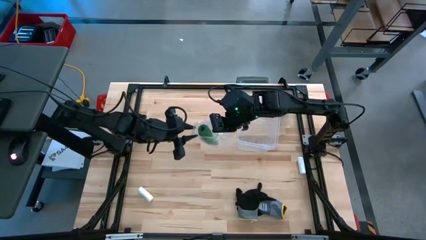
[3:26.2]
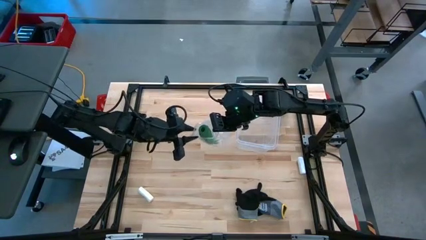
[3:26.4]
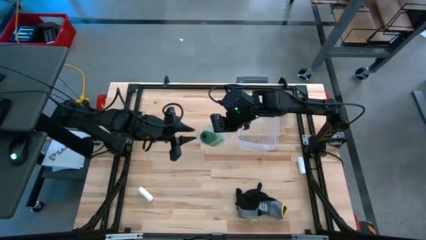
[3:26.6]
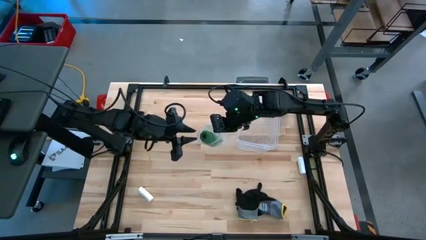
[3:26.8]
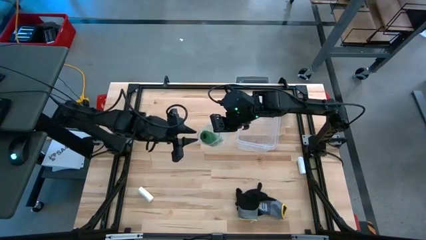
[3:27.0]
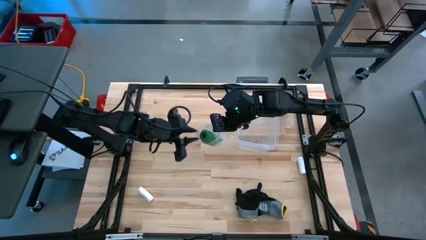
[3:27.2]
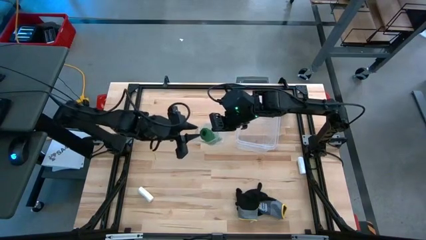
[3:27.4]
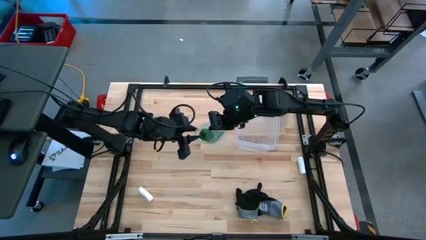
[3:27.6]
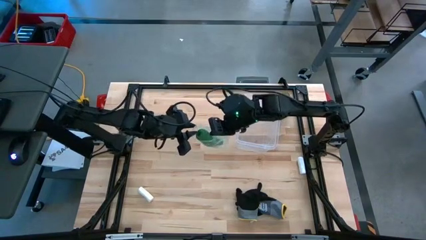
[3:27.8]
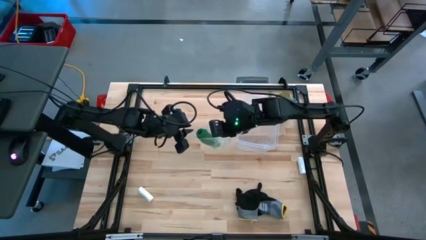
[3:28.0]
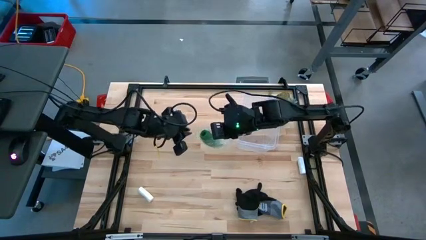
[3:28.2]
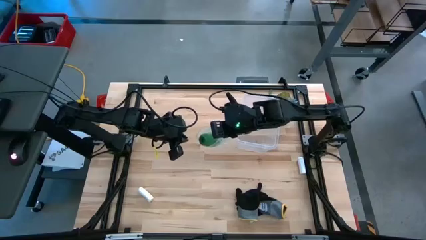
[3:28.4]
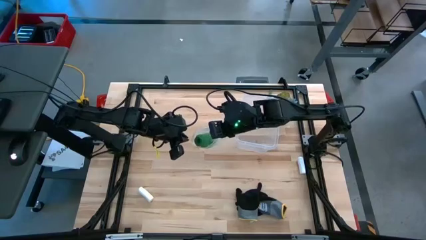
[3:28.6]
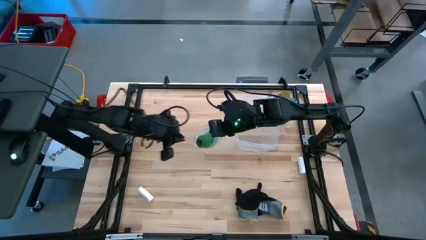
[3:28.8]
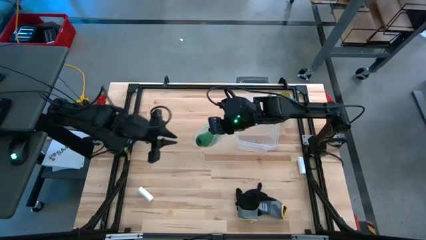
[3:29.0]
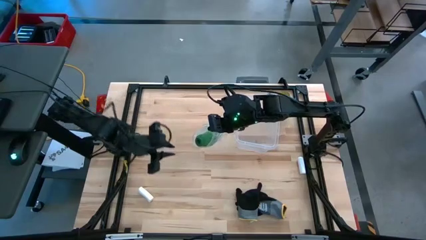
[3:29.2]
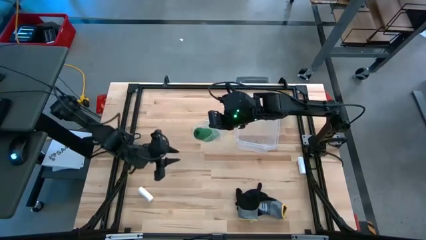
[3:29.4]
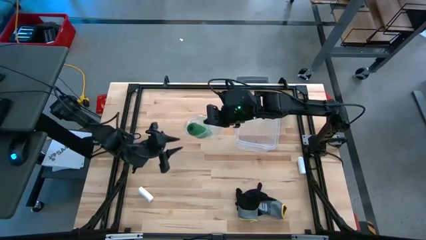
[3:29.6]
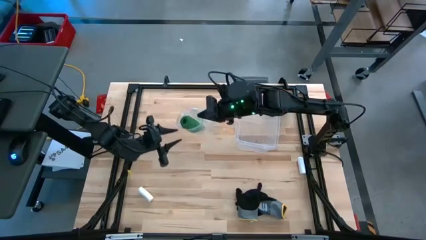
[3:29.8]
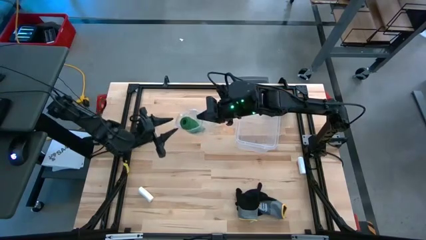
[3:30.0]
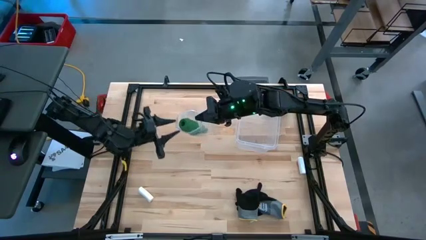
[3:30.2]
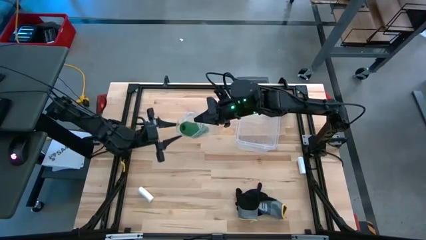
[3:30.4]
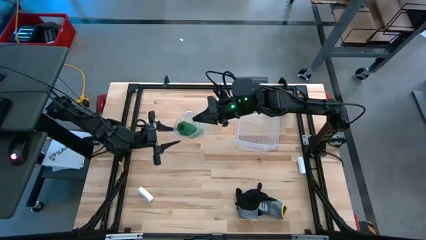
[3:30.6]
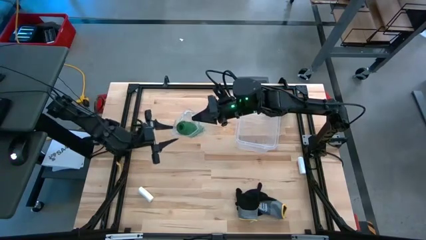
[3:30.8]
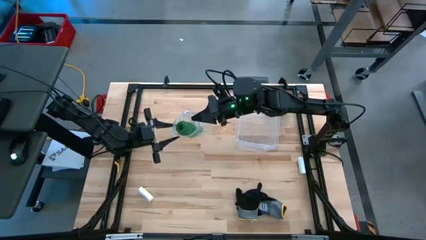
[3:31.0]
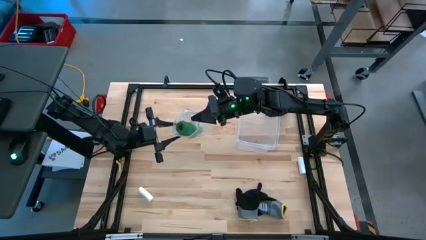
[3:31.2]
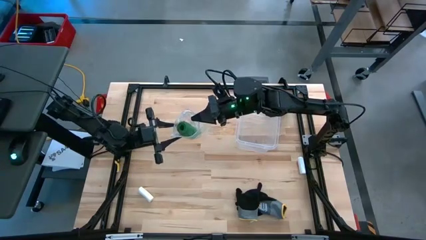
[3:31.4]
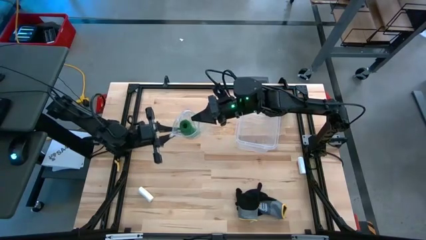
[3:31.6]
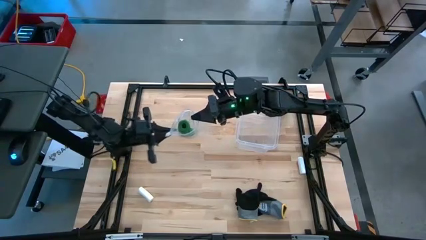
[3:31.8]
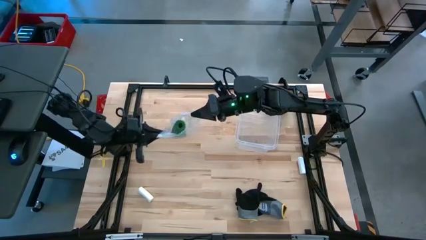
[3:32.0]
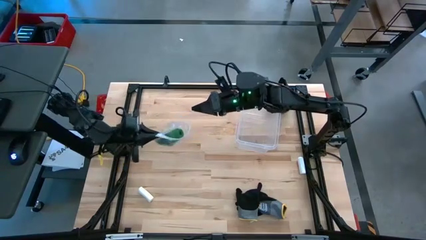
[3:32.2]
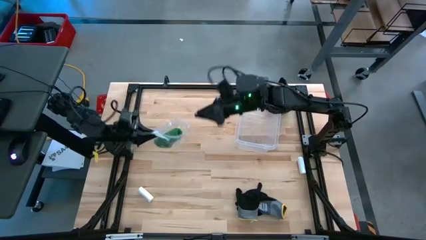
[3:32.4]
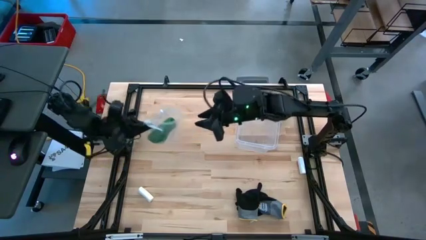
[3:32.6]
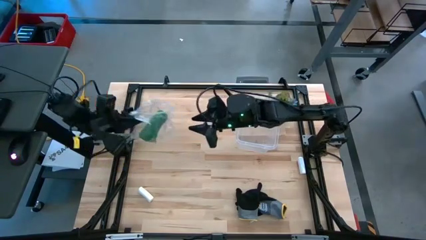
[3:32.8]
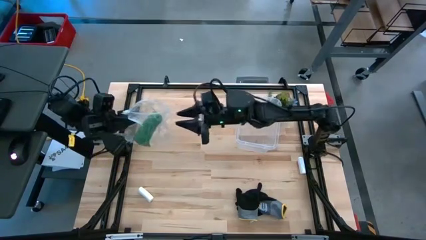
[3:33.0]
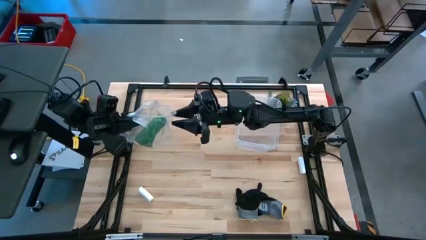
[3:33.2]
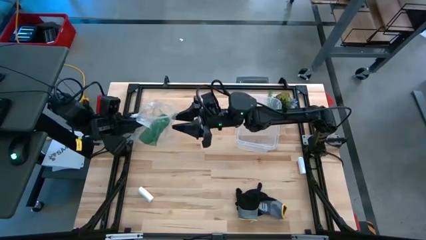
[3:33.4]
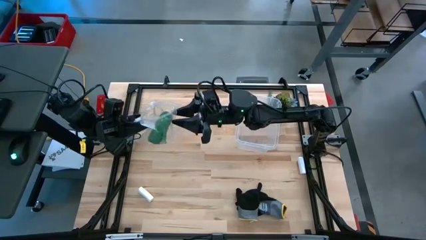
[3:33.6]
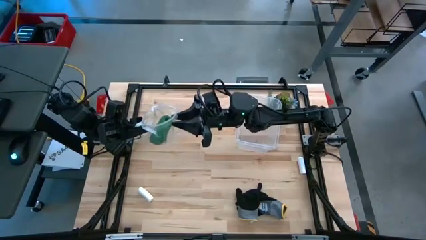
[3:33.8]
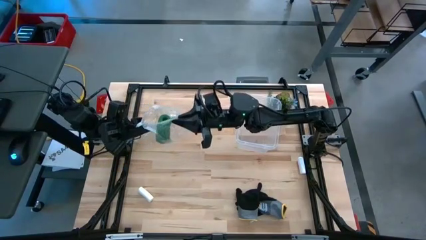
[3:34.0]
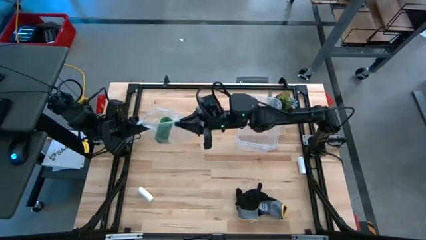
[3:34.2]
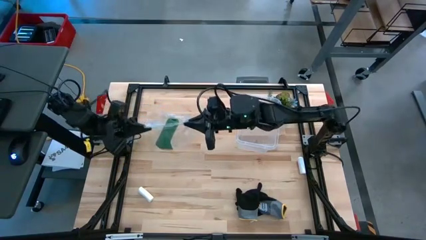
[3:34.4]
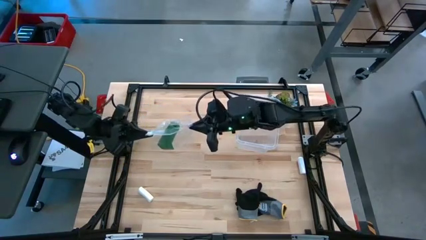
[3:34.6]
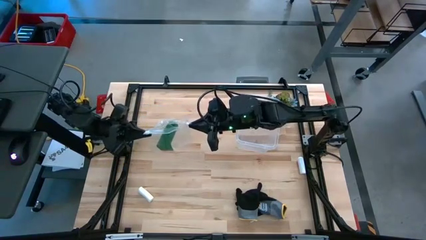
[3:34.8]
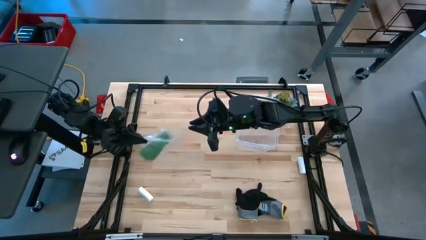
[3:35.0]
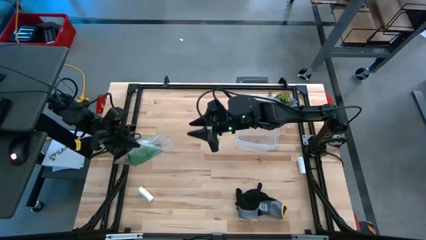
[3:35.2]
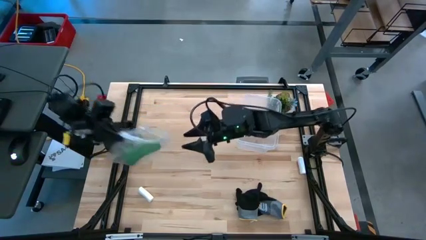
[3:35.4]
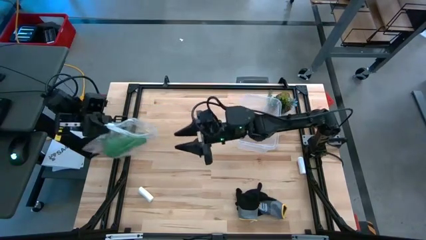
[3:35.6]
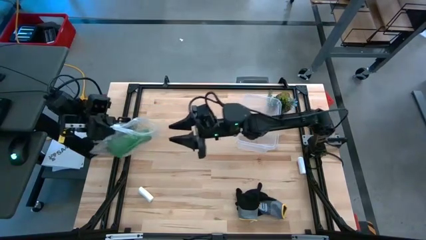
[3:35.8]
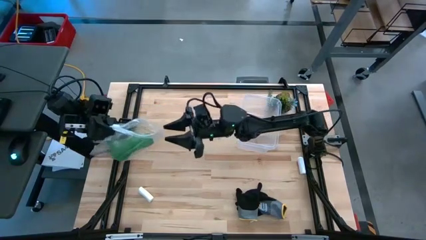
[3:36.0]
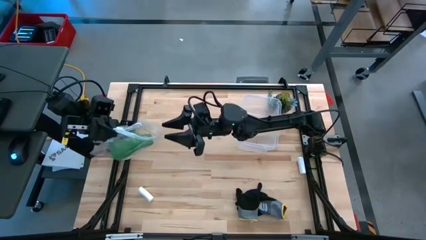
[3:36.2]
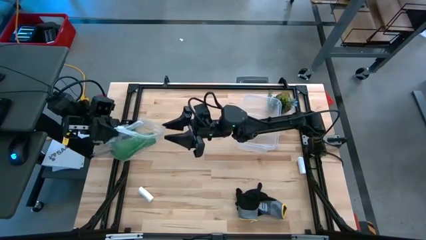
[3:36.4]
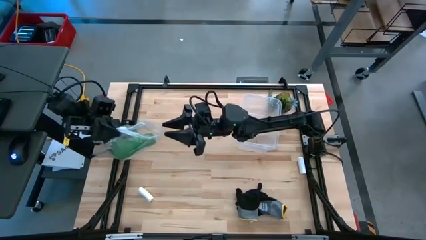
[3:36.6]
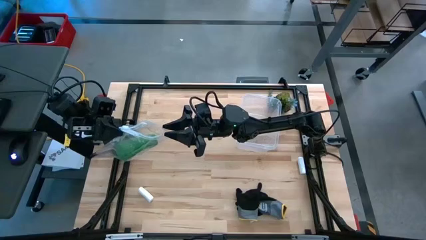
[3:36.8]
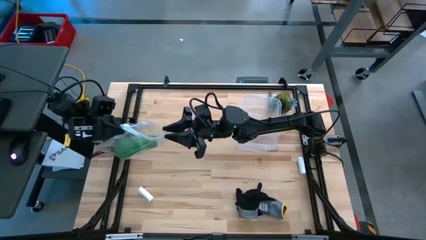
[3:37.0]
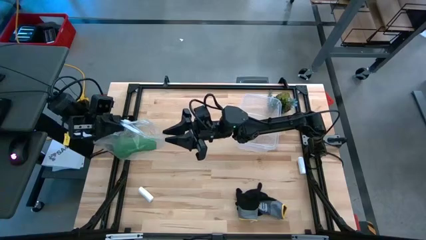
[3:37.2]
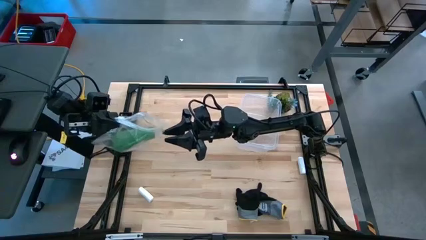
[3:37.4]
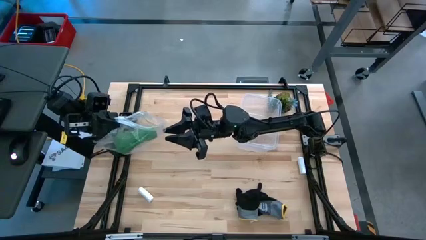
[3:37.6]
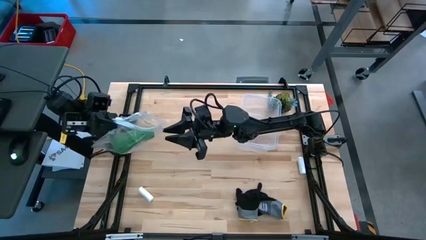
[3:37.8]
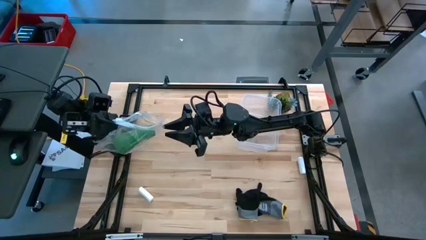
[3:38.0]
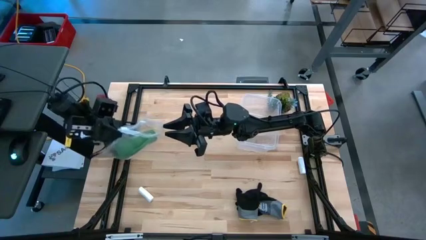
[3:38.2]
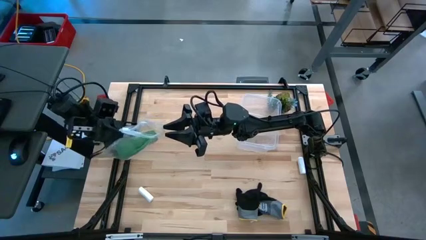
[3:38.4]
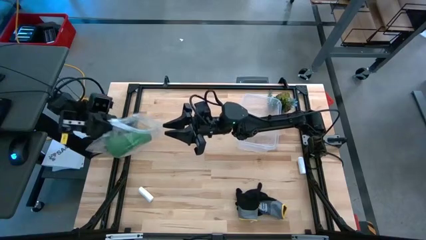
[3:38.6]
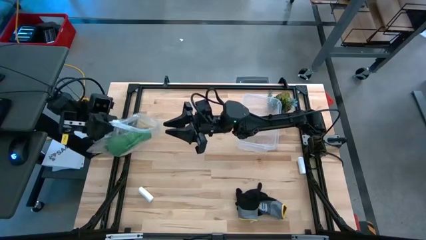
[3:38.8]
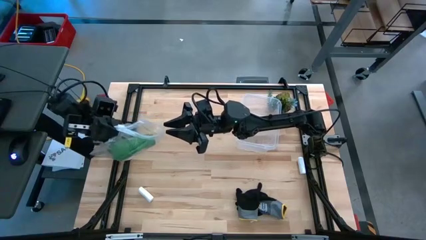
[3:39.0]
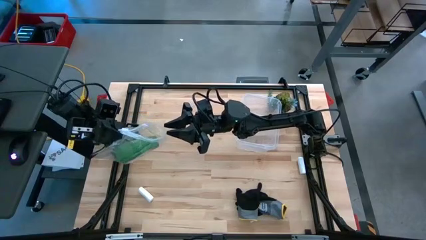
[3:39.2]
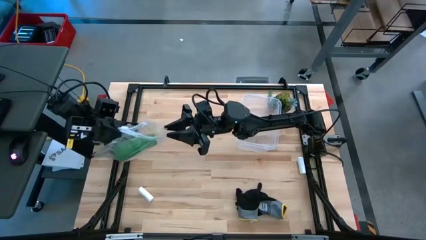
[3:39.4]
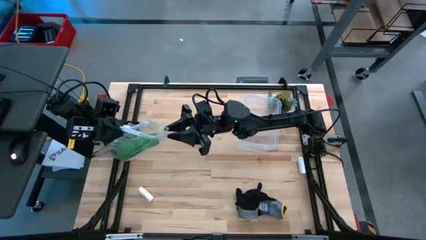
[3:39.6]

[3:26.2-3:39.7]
Task: Roll bandage
Put the green bandage into the transparent zip bag
